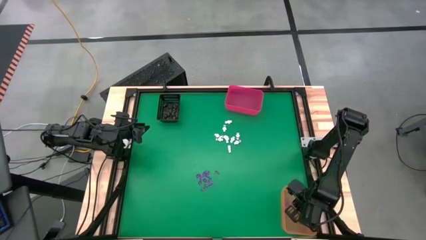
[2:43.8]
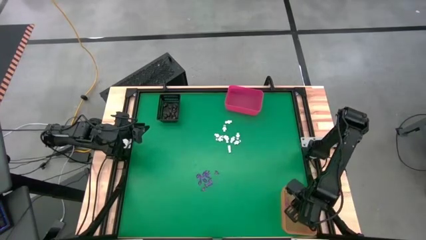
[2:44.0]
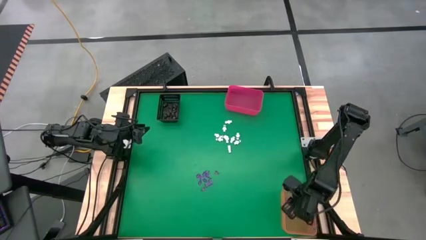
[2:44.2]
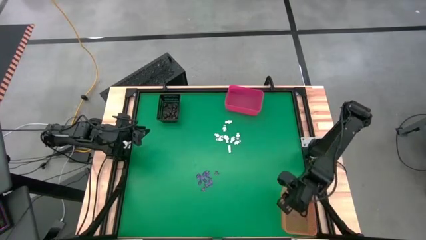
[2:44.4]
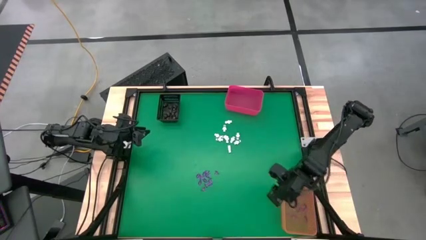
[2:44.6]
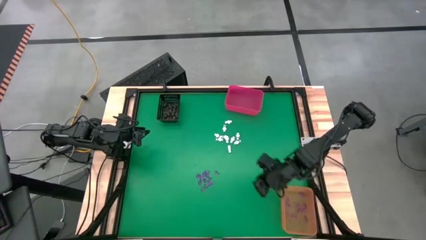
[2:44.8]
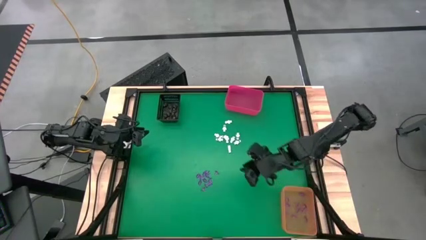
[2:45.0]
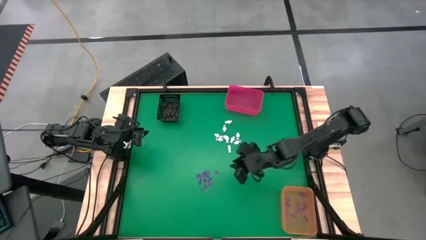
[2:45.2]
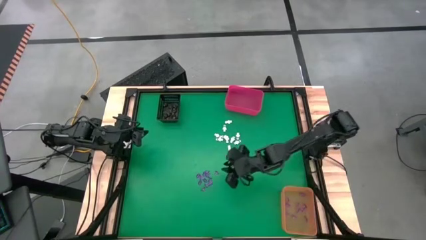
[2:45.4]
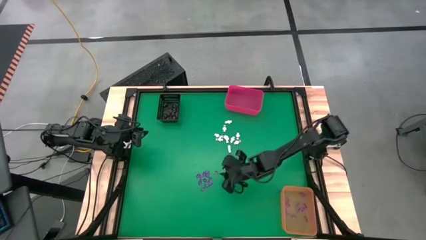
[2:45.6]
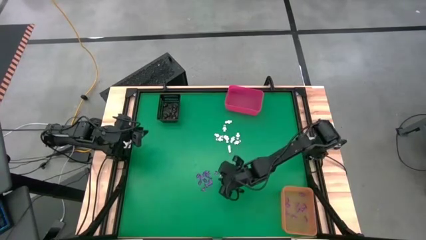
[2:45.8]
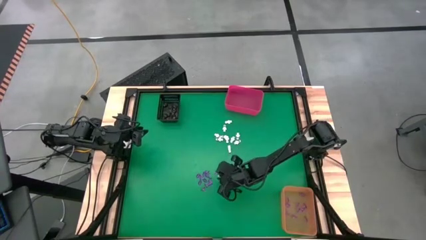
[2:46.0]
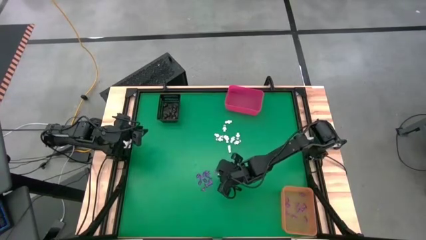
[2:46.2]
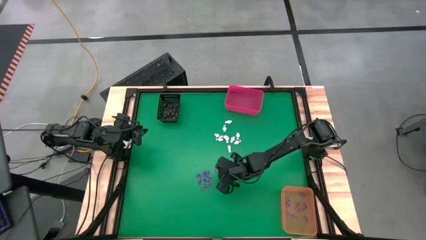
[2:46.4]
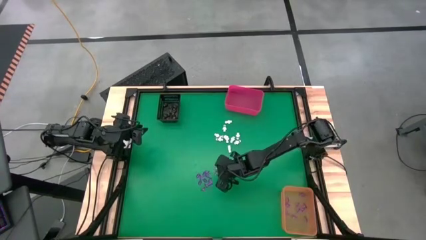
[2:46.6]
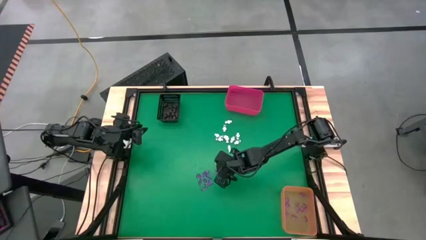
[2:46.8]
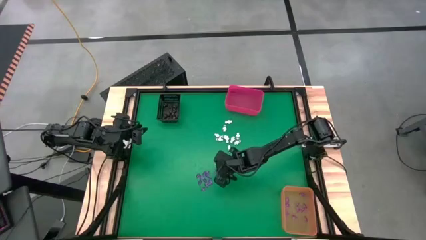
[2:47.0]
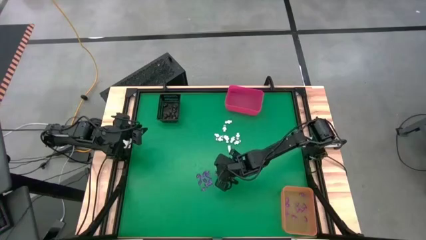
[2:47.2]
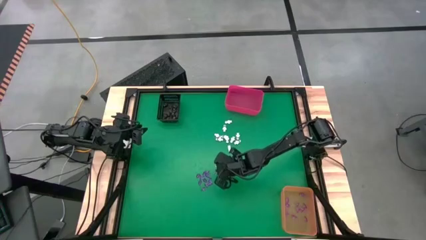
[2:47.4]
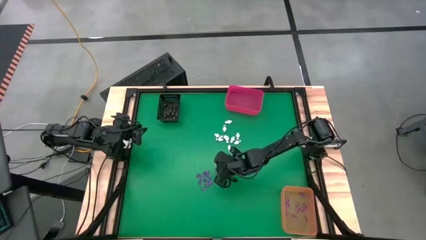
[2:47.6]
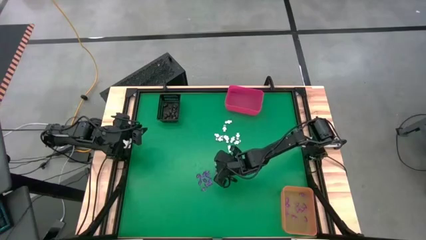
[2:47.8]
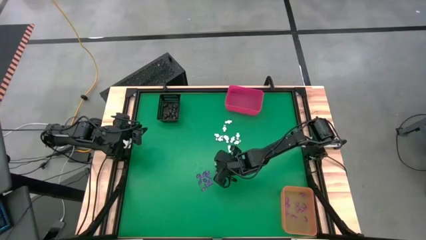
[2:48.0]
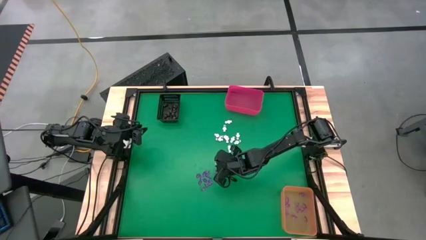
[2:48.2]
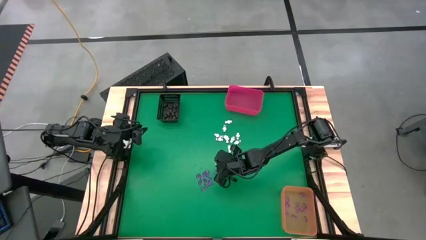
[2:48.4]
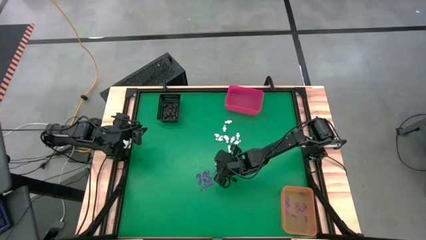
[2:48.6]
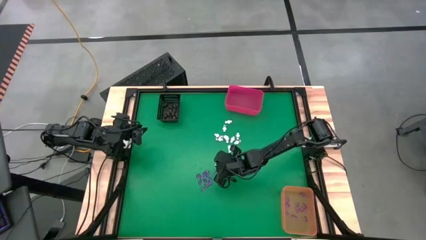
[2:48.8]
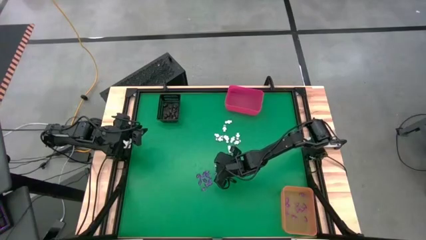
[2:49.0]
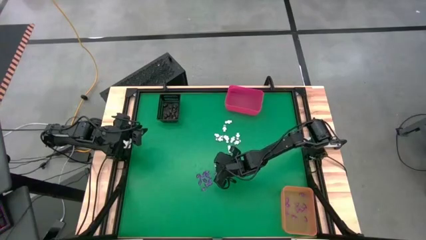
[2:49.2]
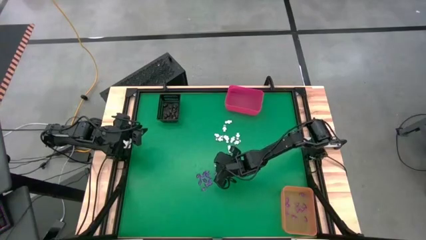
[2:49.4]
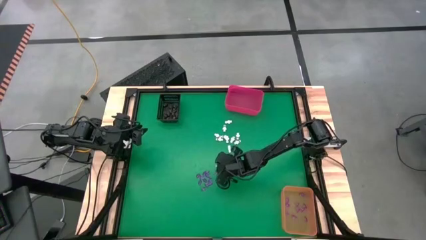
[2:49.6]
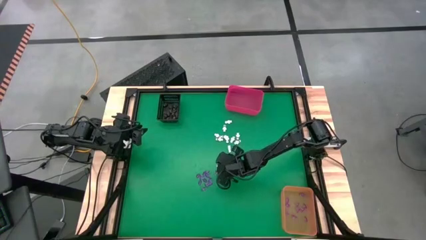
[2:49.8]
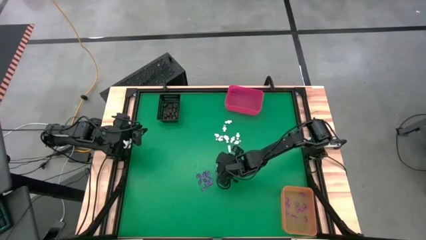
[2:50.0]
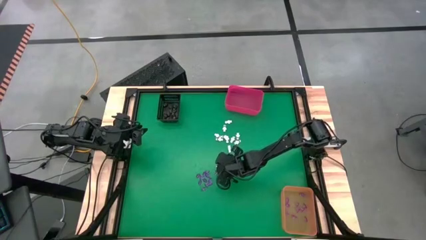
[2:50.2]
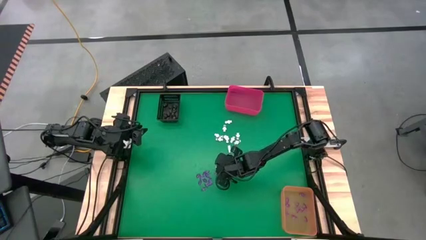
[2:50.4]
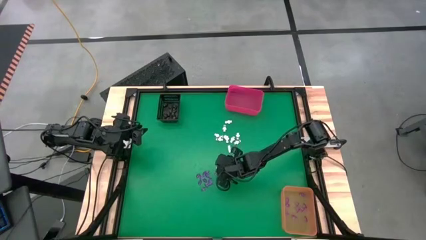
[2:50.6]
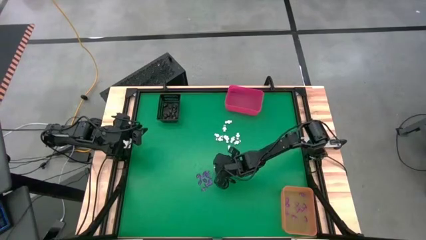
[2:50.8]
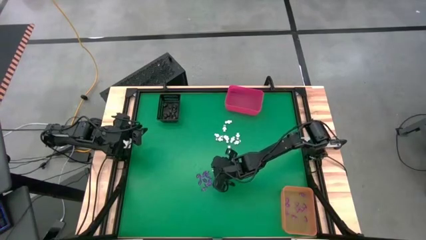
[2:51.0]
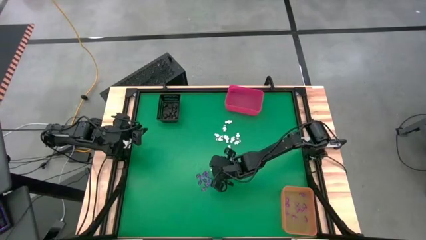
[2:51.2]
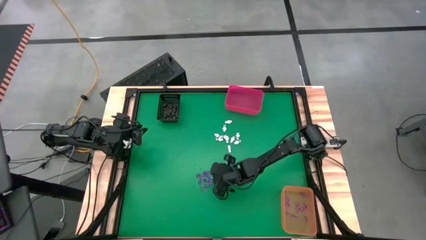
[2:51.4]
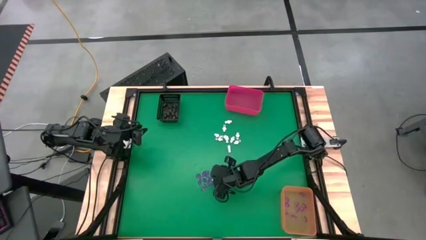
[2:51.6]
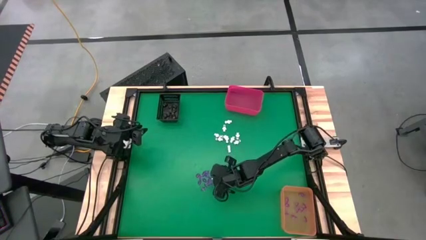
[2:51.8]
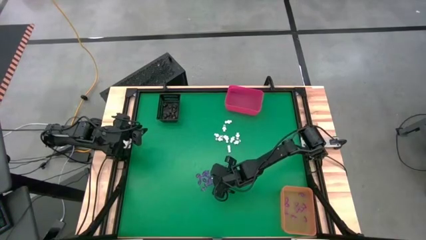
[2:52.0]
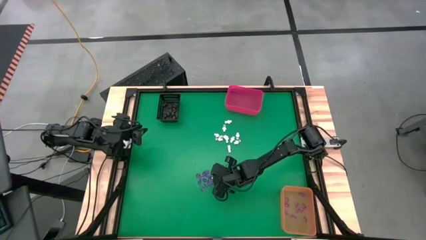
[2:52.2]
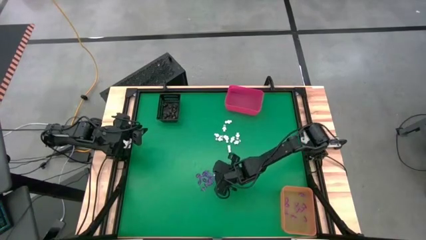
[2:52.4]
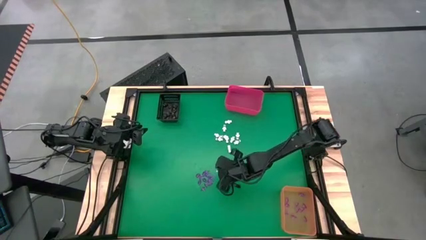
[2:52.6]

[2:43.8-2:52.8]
Task: Sort Halloween decoration
Put the pink witch hat toy into the orange bin

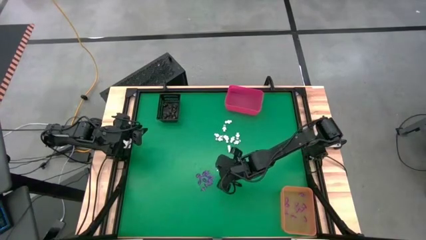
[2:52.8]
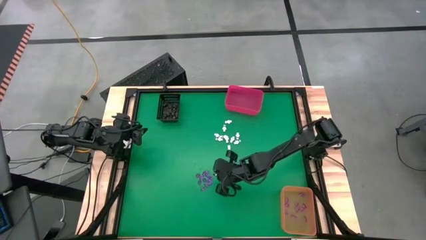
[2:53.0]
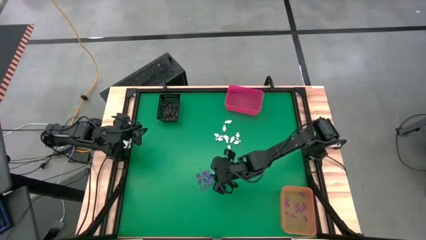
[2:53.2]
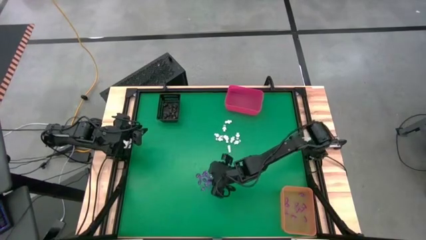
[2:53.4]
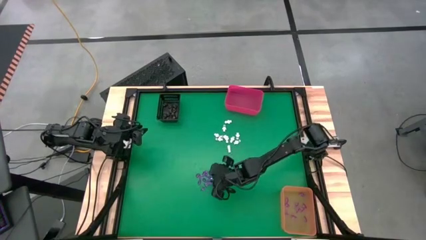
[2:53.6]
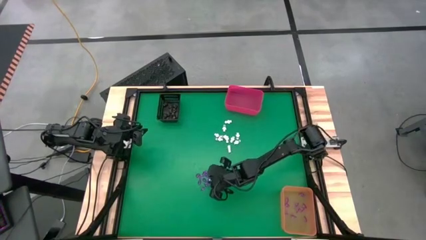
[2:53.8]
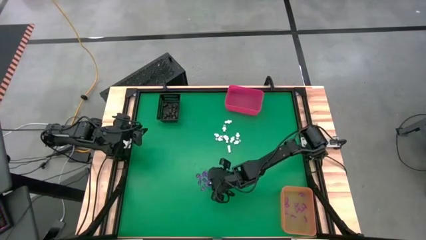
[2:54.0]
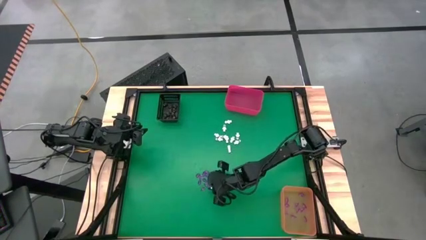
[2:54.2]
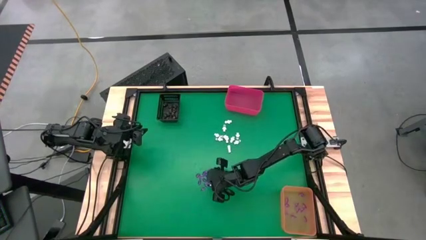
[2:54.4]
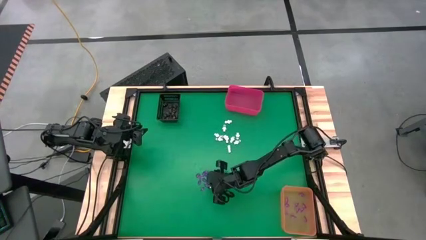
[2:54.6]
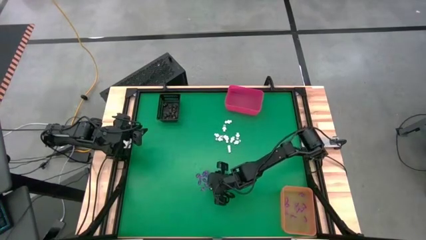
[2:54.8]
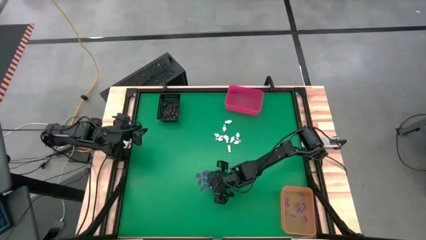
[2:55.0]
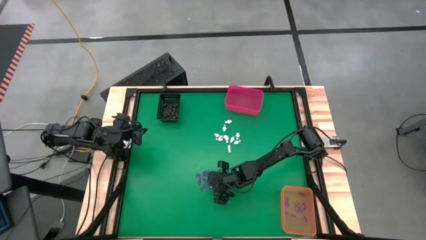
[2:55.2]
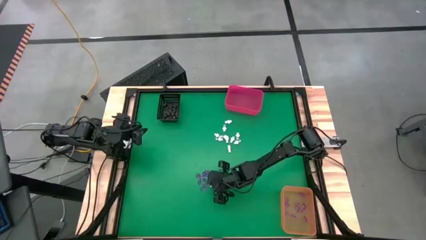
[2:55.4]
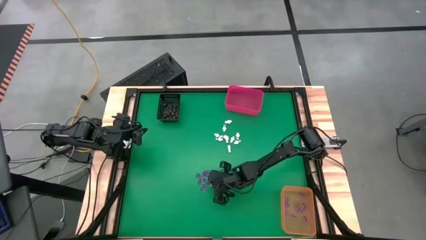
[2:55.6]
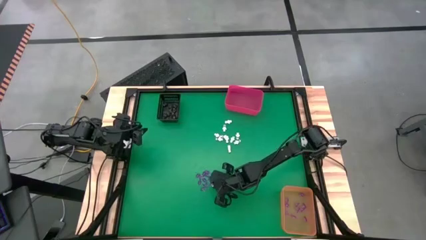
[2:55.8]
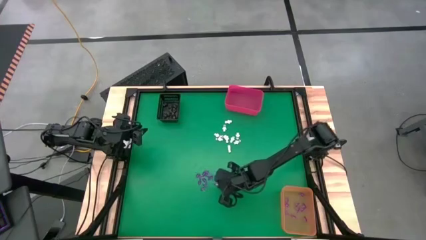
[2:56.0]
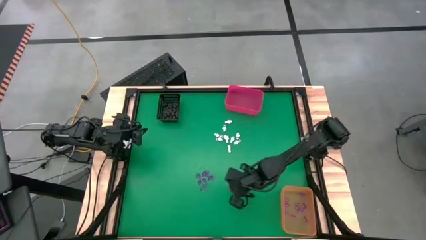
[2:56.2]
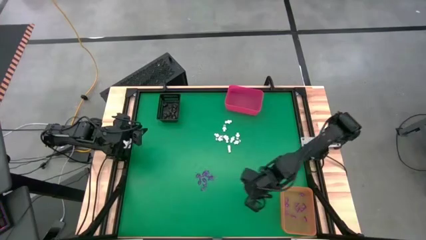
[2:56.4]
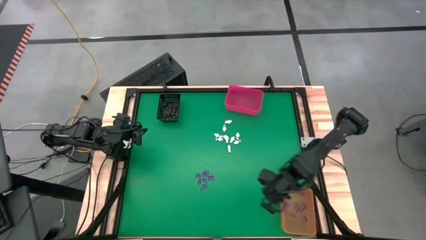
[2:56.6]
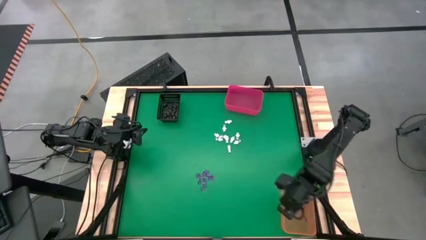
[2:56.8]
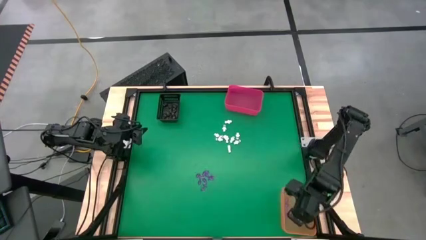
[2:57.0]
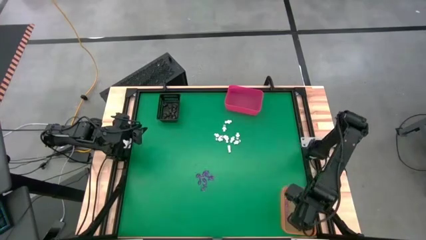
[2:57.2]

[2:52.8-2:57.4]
Put the pink witch hat toy into the orange bin

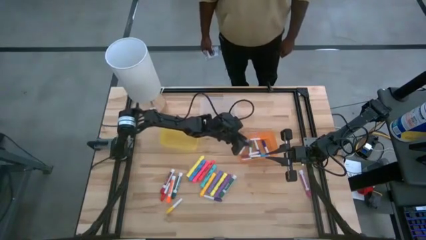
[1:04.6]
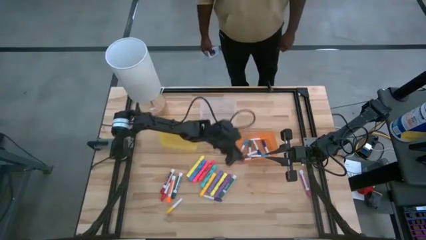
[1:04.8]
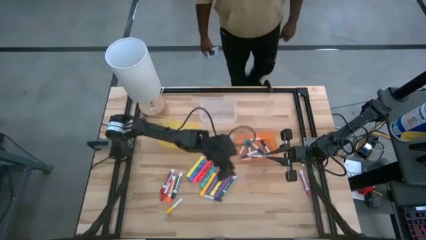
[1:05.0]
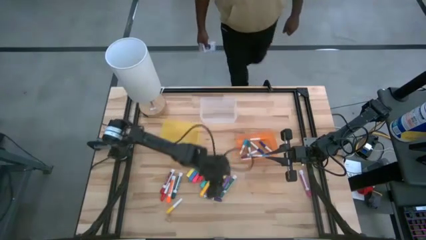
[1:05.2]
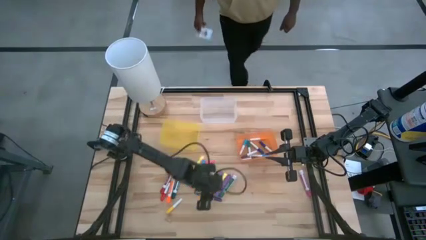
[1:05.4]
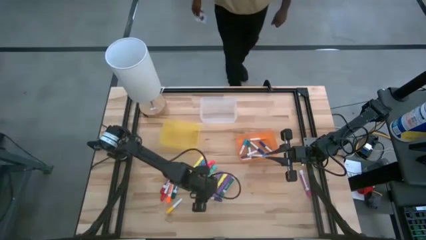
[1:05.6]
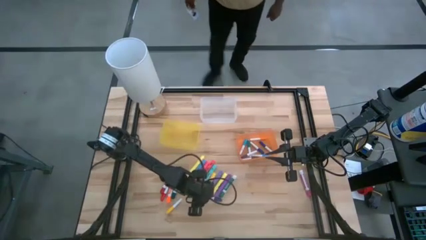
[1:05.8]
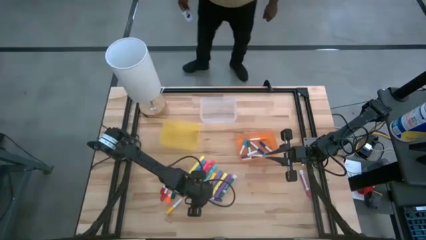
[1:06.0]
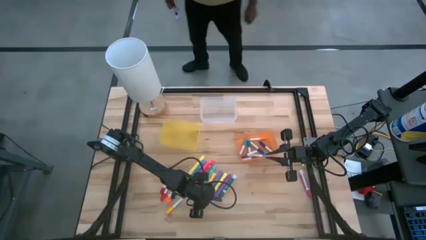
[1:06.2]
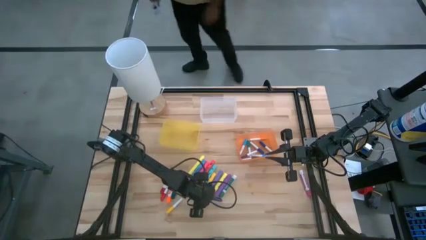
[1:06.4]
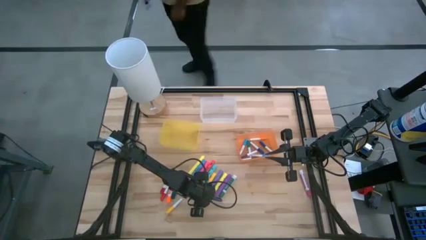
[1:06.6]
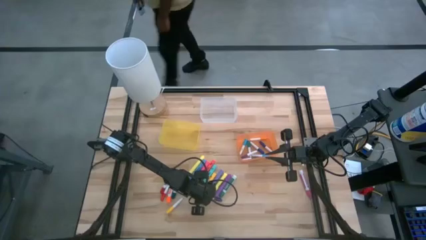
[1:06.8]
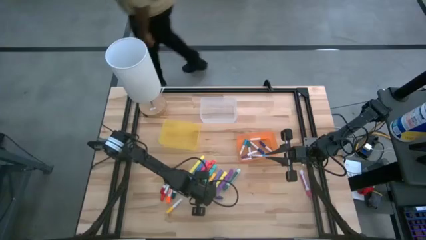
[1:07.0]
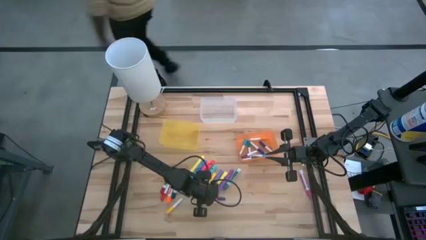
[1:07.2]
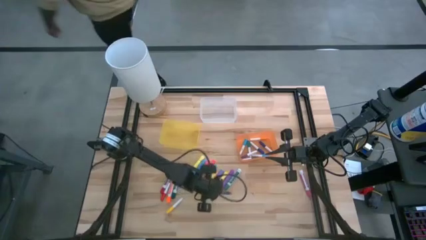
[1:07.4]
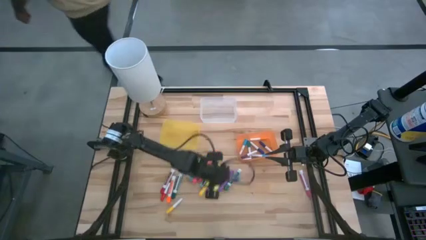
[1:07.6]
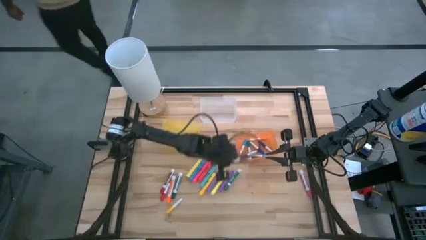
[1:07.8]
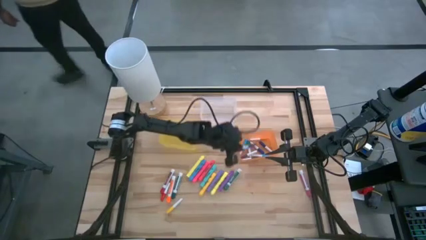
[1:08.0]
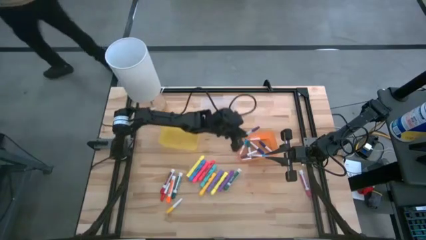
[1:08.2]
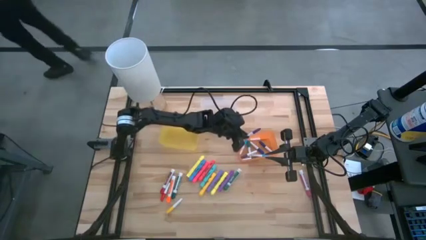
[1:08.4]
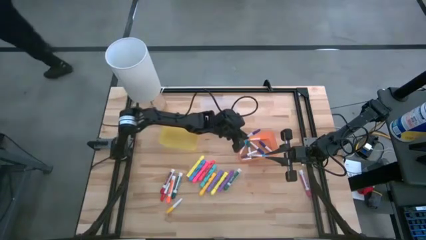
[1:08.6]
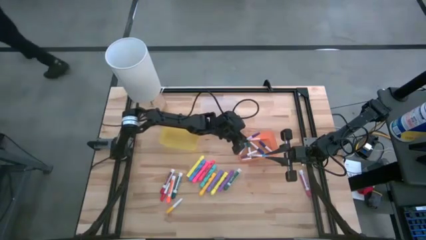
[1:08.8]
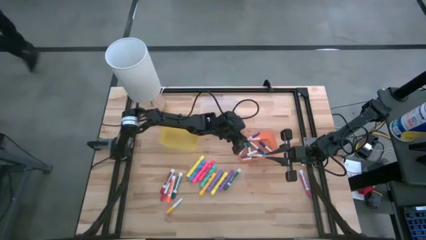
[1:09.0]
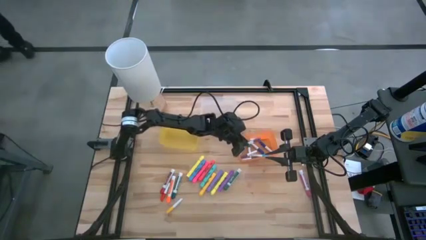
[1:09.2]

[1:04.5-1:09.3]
Task: Pick & Place Markers
Put the small violet highlighter pen into the orange bin
